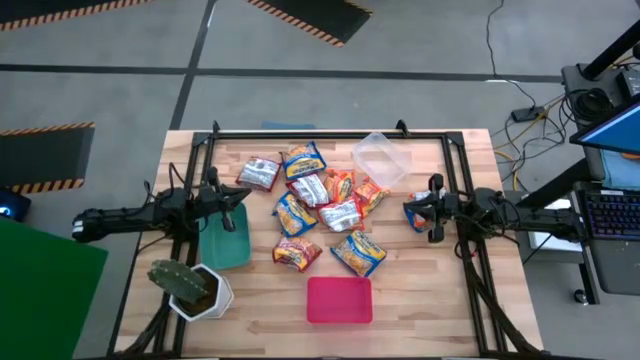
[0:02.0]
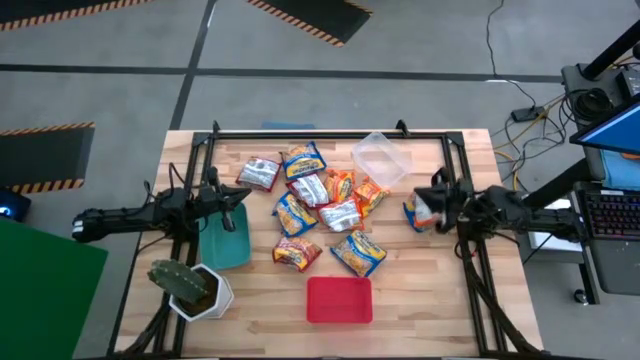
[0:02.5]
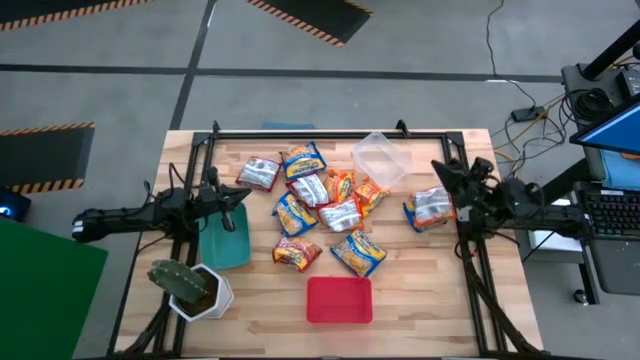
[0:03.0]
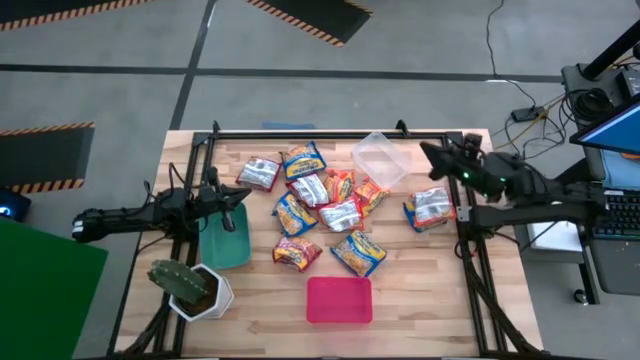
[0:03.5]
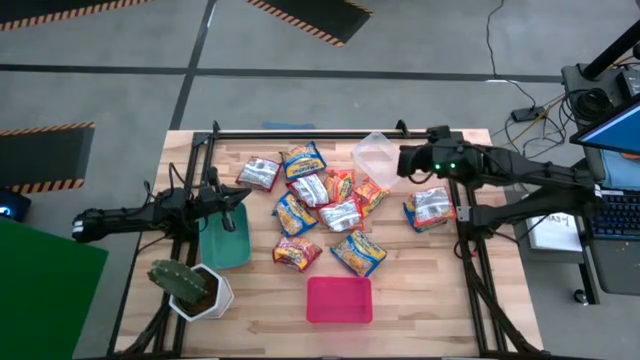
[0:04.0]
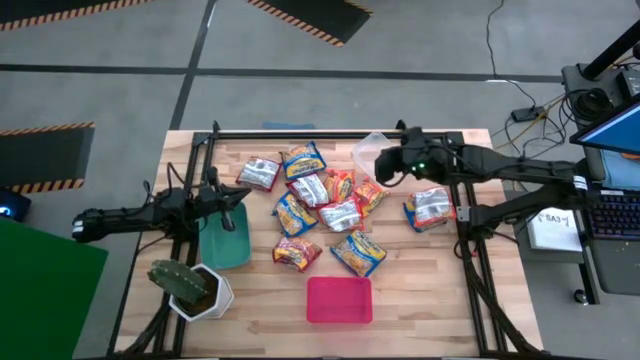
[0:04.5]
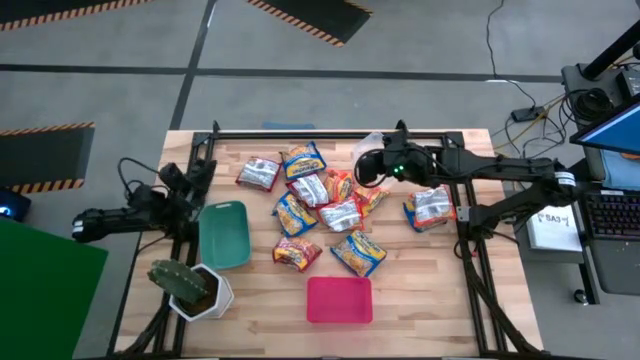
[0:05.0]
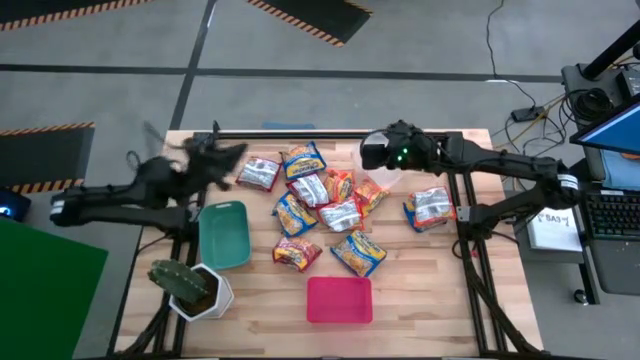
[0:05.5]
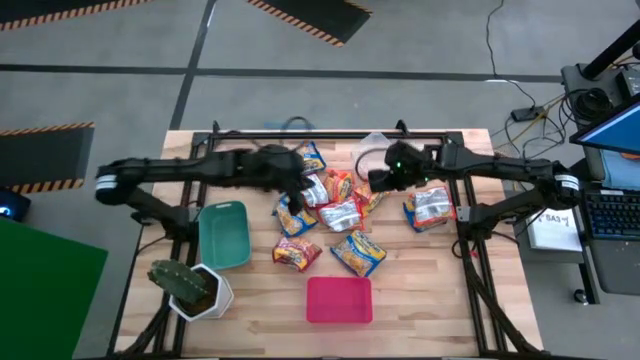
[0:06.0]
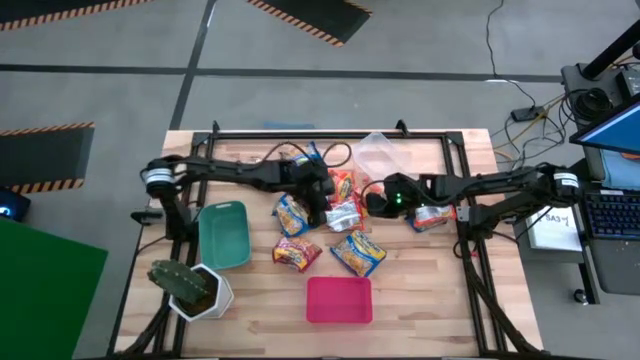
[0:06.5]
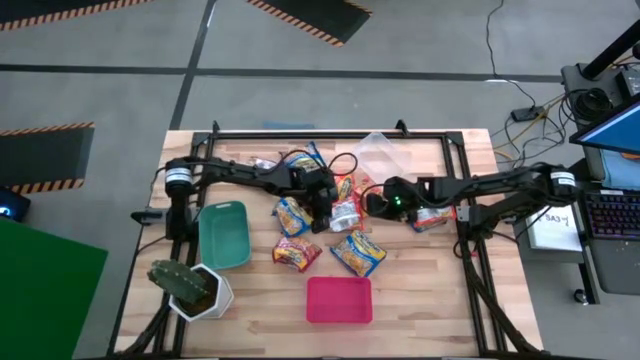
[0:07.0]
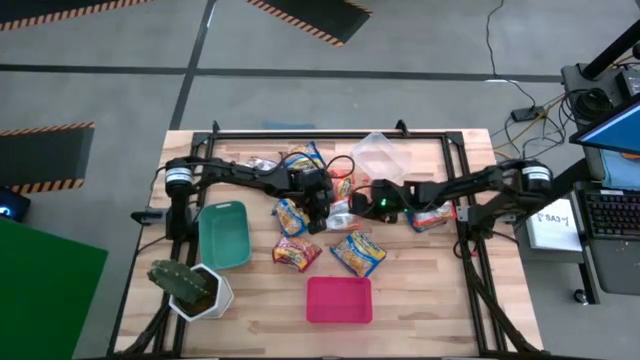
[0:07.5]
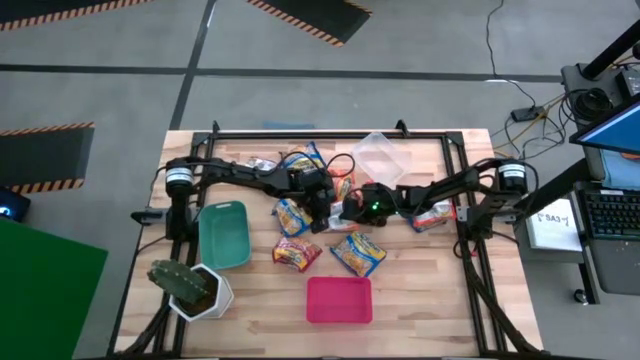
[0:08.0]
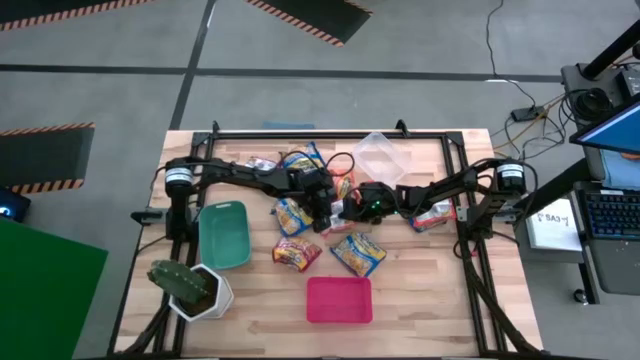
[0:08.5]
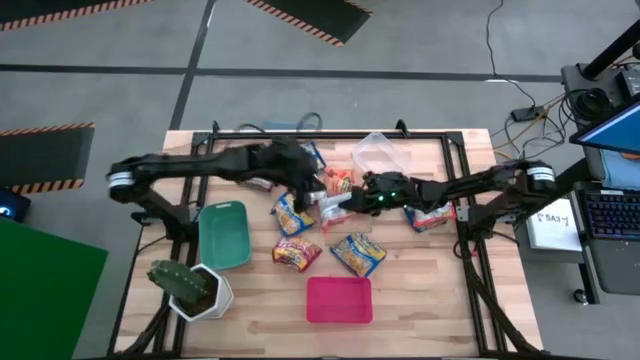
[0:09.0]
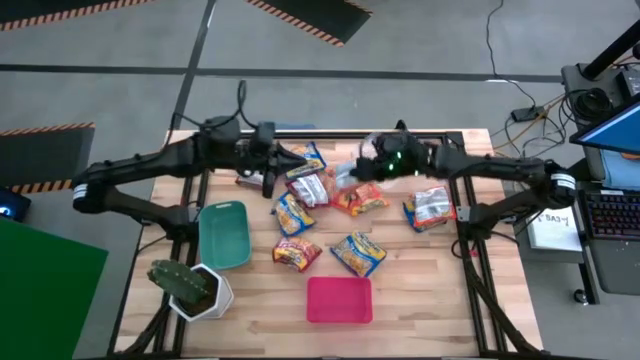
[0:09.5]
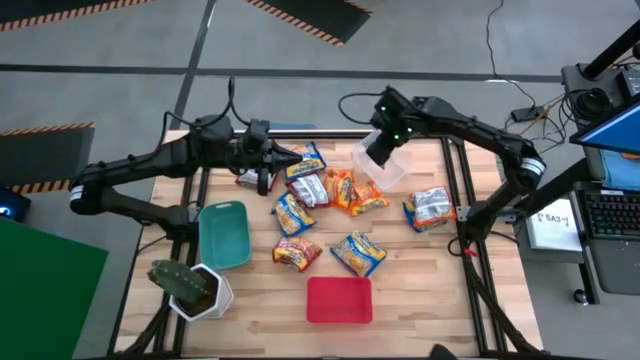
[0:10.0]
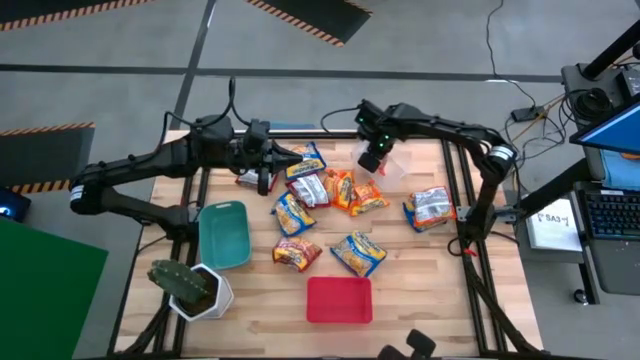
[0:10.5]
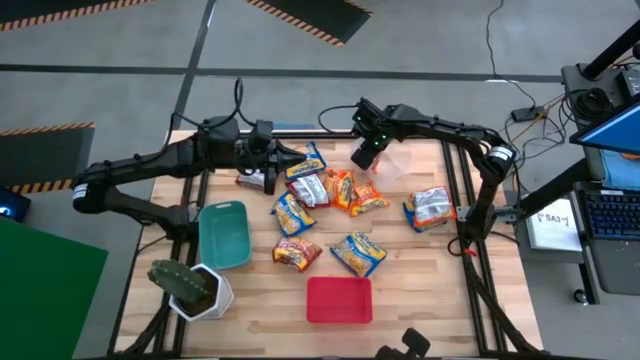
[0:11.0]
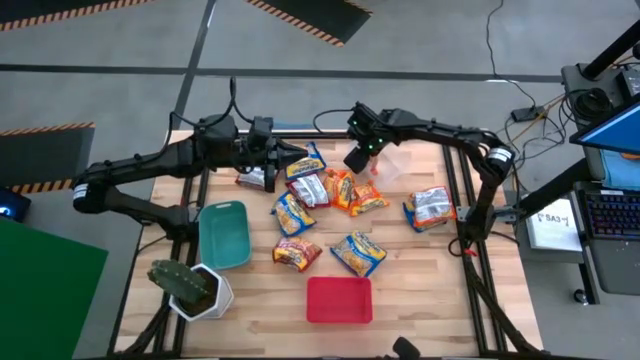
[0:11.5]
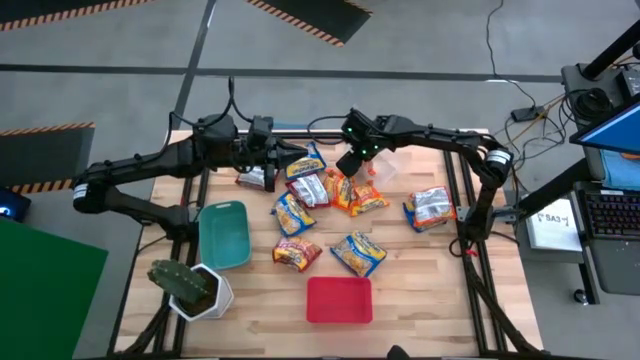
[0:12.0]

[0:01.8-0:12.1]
Task: Sort Maruchan noodles
Put the bottom left orange noodle pack into the transparent bin

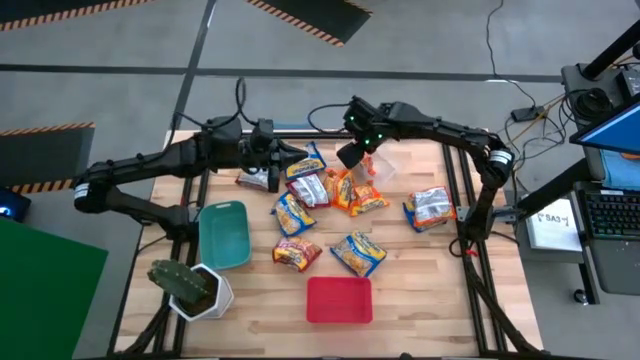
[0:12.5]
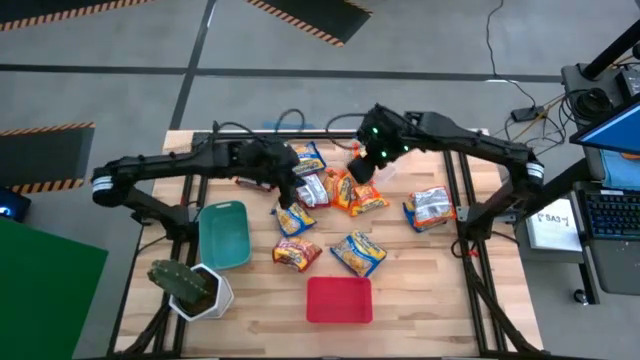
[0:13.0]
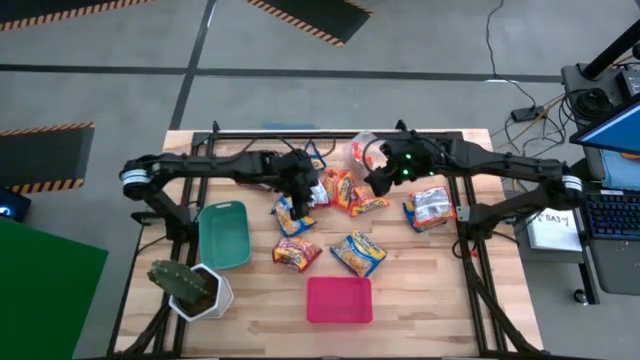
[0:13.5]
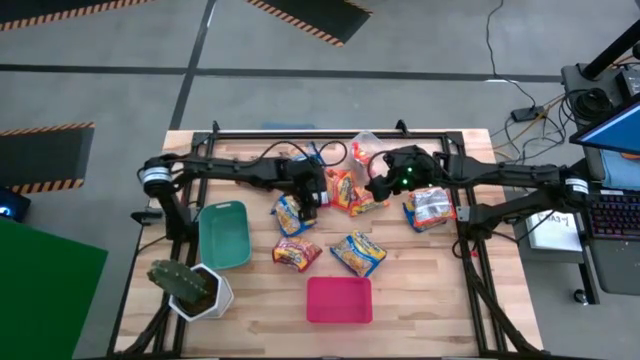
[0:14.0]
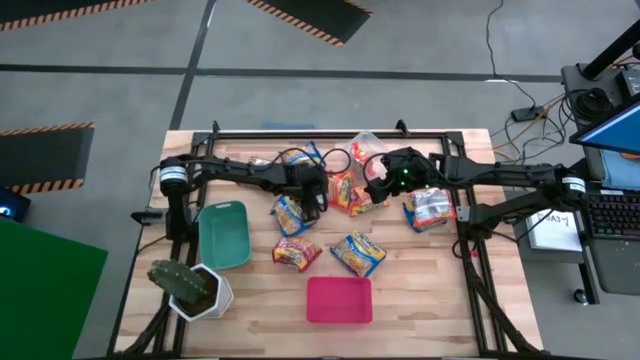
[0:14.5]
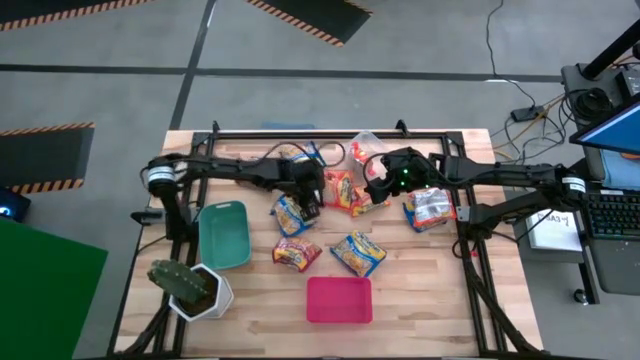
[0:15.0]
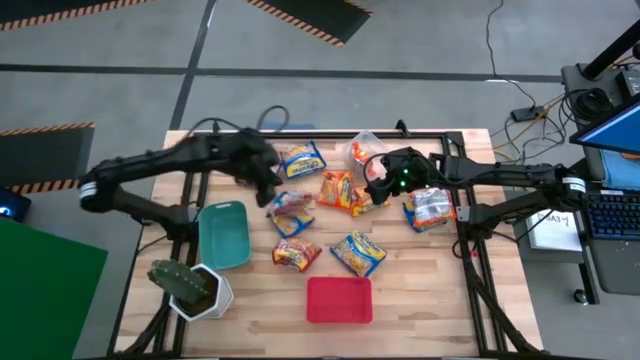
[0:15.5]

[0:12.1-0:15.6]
Put the middle left red noodle pack into the green bin

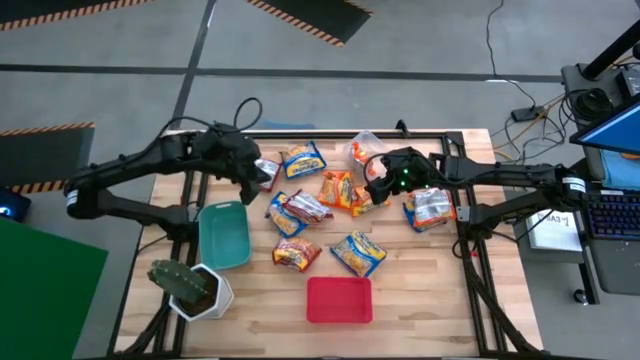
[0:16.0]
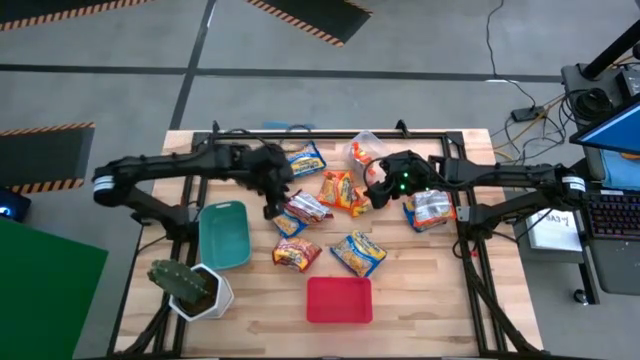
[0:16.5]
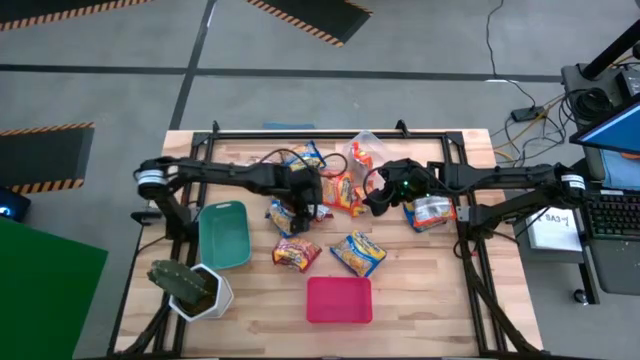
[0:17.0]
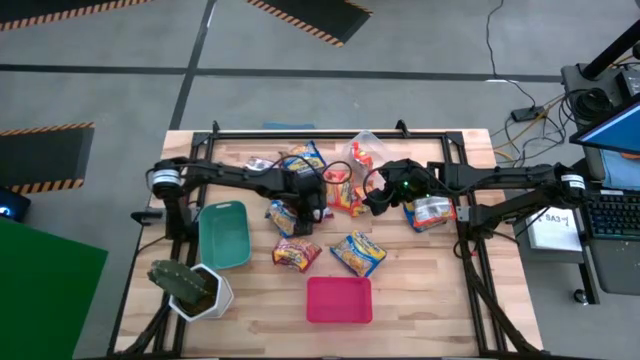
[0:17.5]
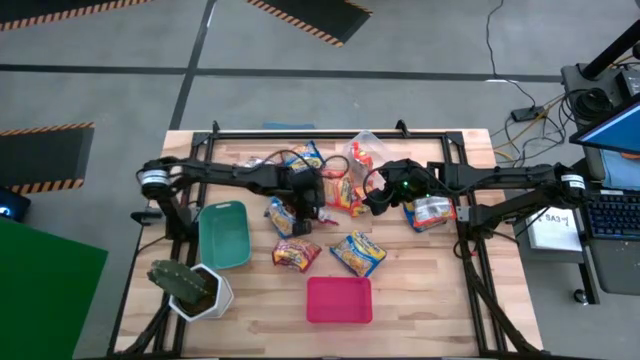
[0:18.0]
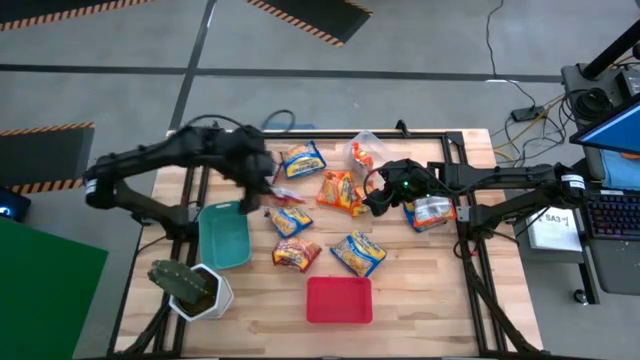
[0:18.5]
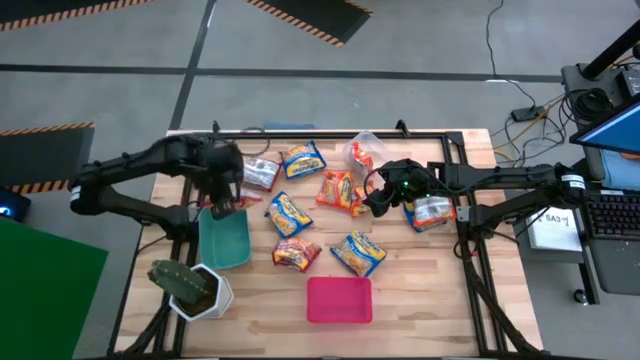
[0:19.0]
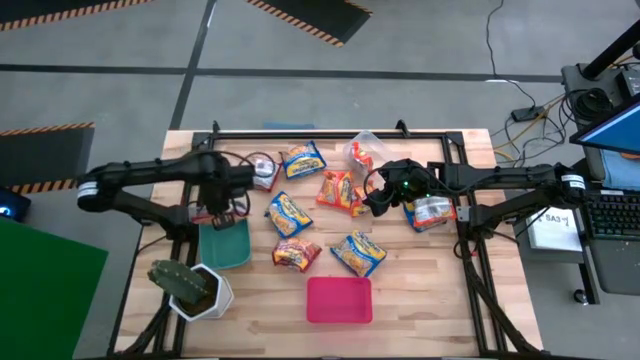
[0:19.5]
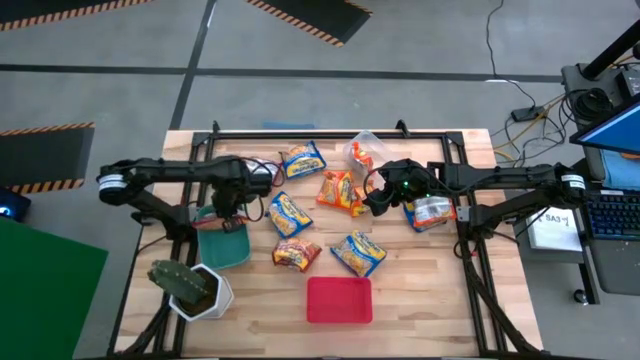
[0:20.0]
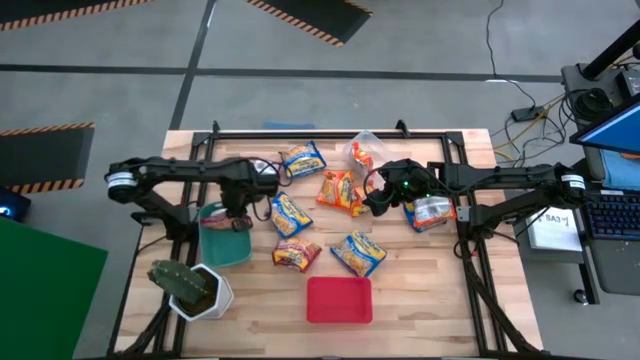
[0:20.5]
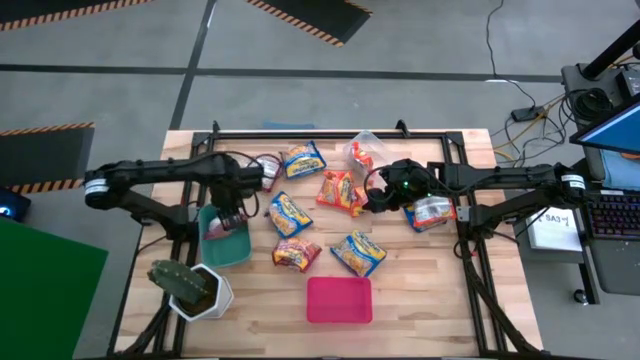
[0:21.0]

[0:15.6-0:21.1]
Put the middle left red noodle pack into the green bin

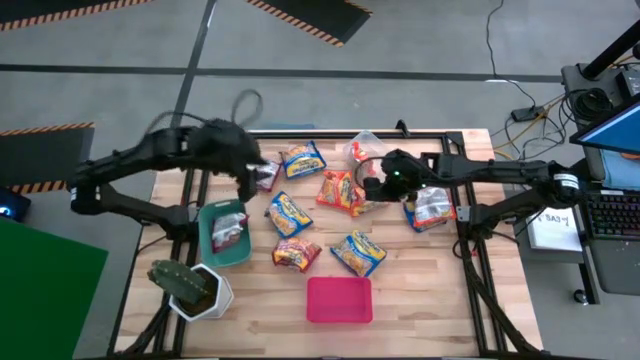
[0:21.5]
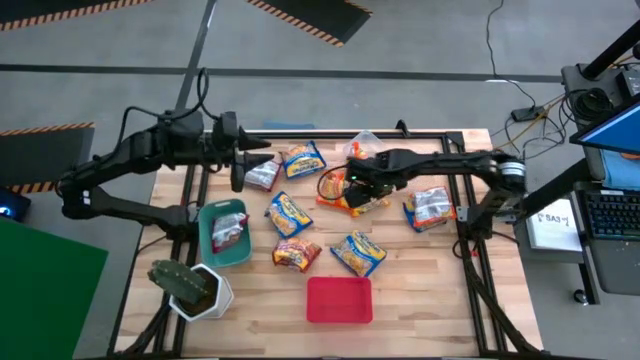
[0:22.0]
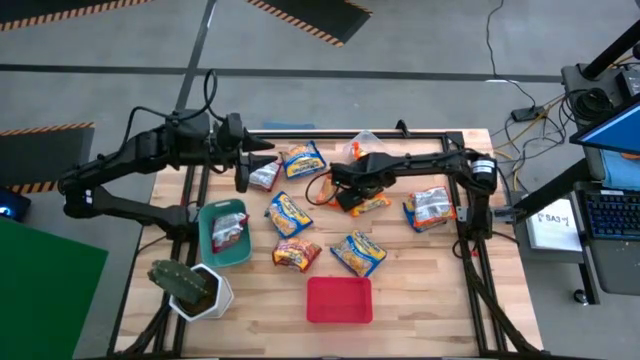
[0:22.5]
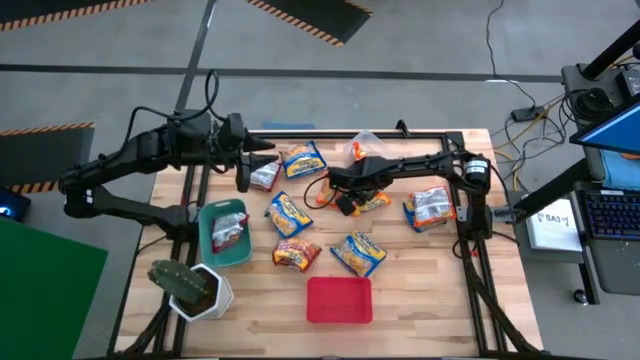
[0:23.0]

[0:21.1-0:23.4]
Put the center orange noodle pack into the transparent bin
